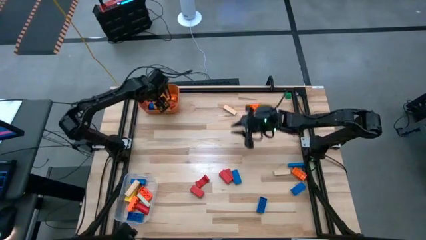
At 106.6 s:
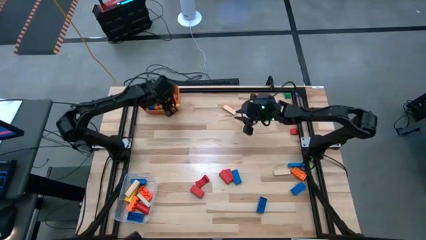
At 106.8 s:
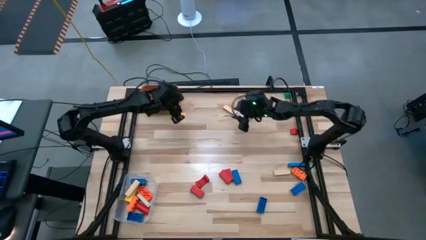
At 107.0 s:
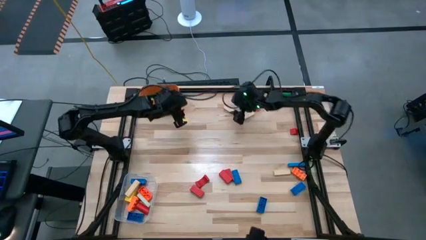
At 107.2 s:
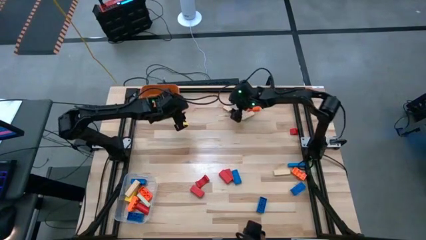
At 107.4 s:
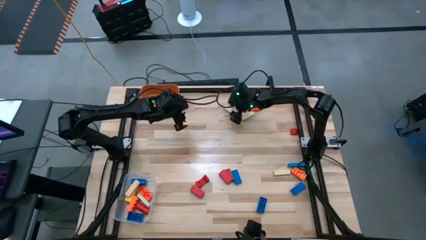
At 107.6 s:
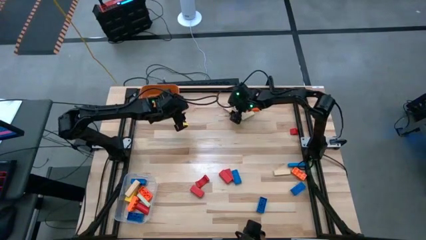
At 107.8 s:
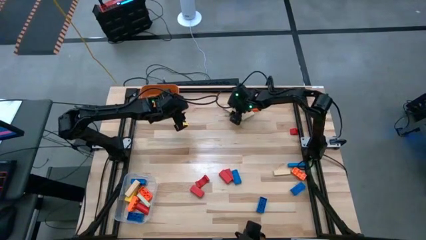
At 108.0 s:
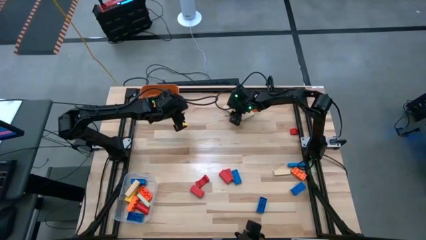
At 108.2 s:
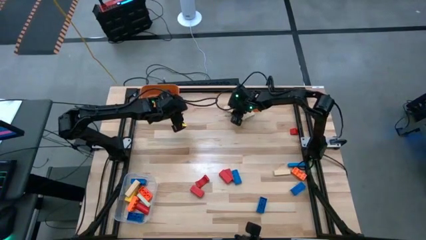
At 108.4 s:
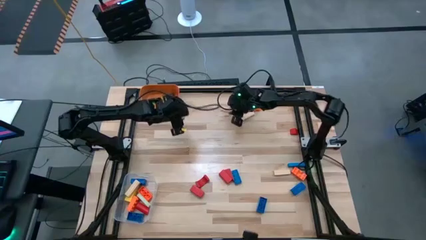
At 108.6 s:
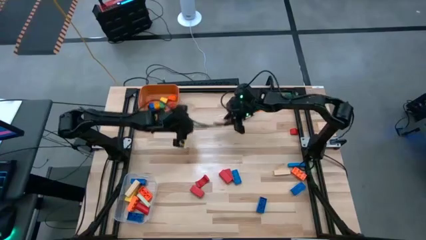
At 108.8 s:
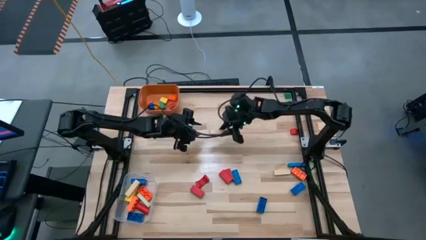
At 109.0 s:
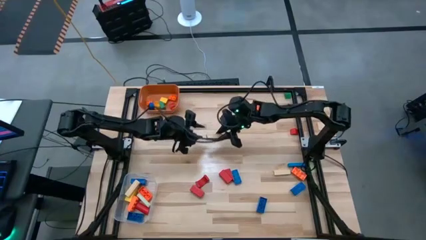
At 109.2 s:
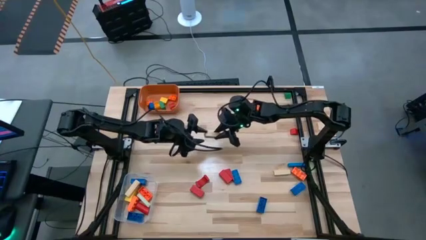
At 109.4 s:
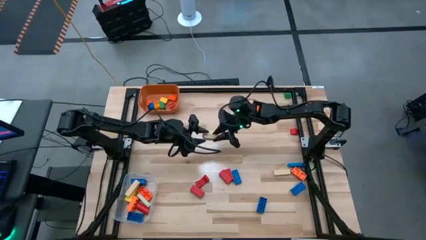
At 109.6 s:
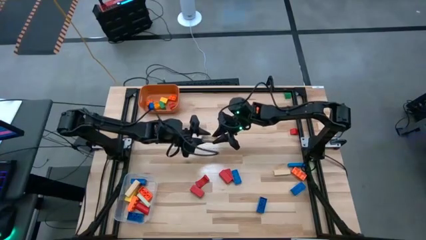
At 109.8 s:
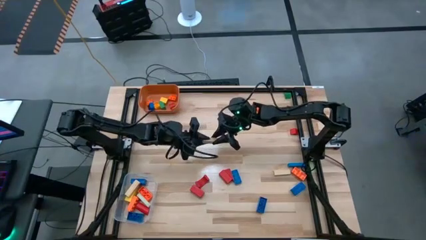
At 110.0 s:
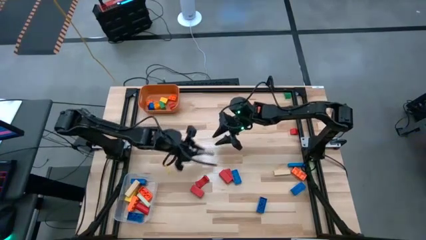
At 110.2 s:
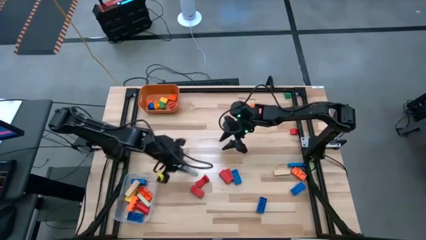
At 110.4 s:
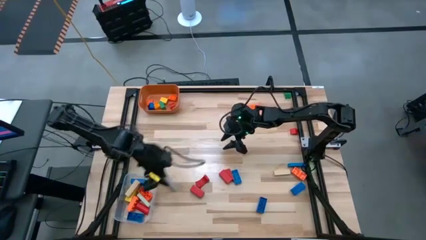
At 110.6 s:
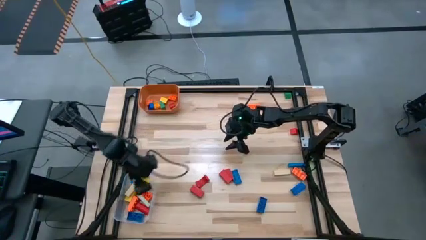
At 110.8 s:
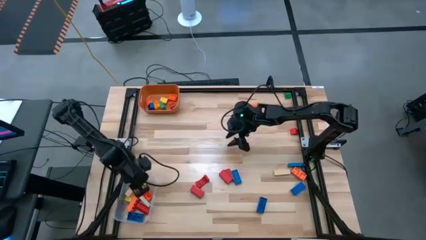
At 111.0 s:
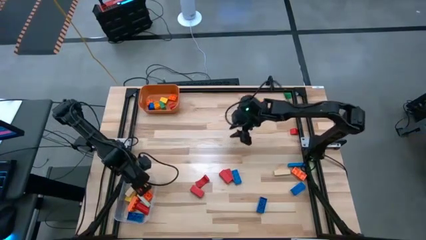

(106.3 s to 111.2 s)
Task: Sort blocks by size
Put the large brown block into the transparent bin

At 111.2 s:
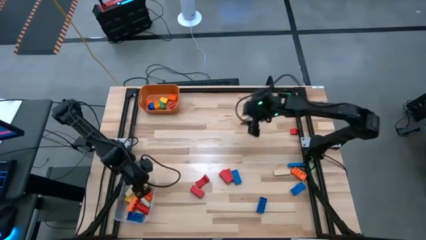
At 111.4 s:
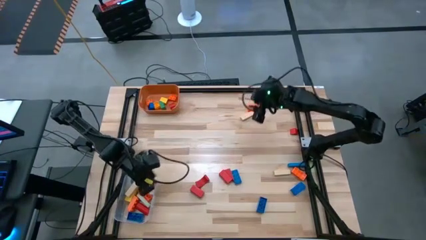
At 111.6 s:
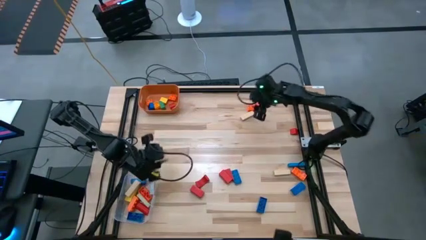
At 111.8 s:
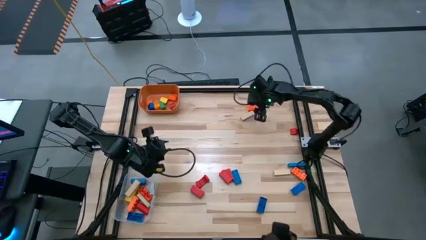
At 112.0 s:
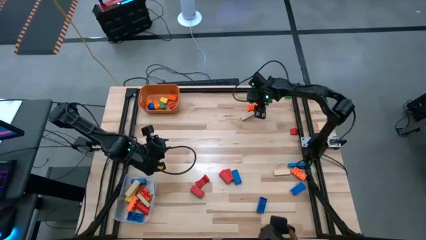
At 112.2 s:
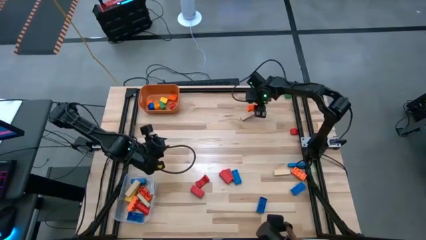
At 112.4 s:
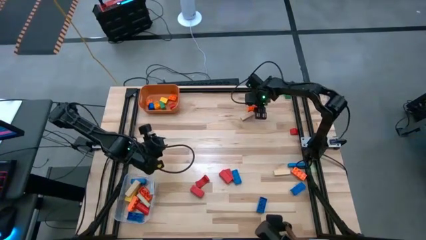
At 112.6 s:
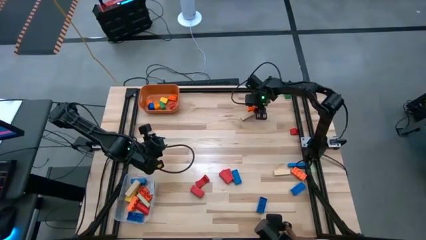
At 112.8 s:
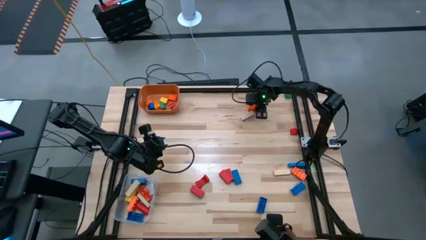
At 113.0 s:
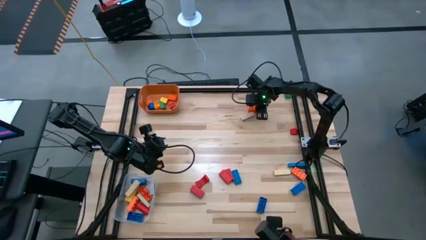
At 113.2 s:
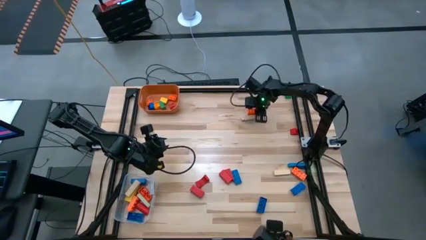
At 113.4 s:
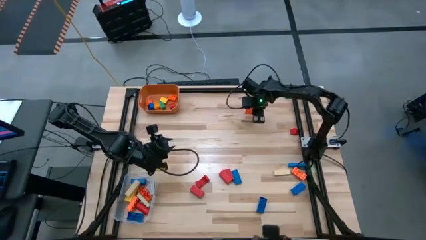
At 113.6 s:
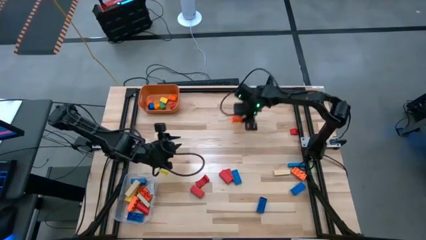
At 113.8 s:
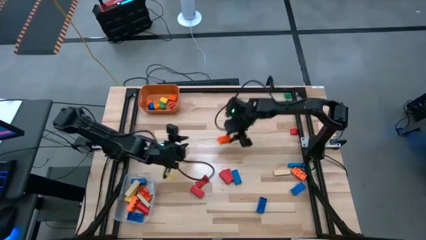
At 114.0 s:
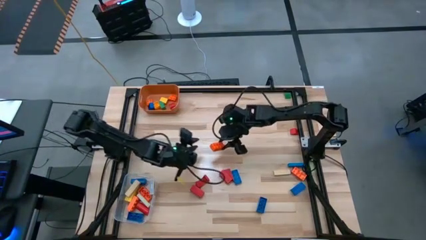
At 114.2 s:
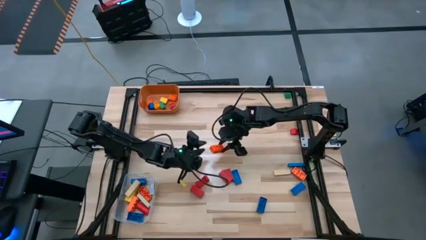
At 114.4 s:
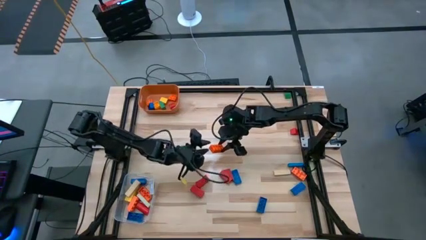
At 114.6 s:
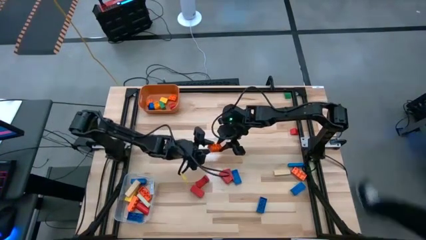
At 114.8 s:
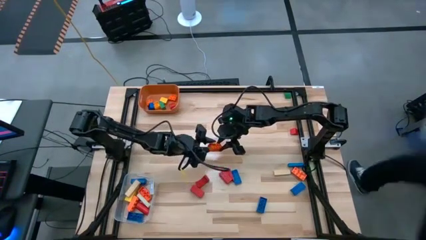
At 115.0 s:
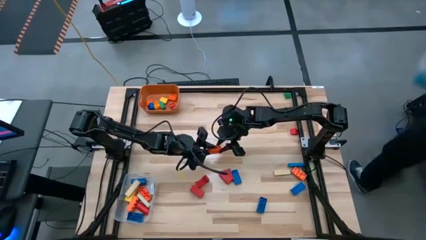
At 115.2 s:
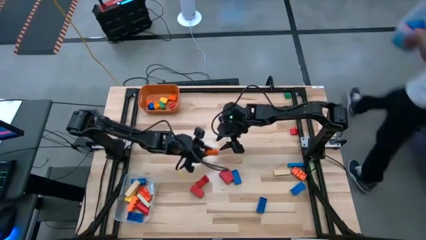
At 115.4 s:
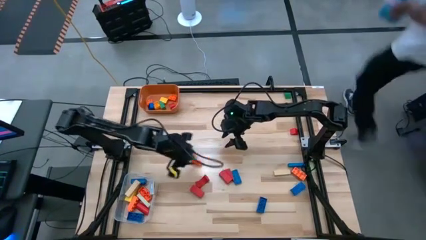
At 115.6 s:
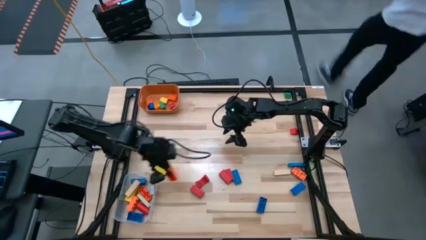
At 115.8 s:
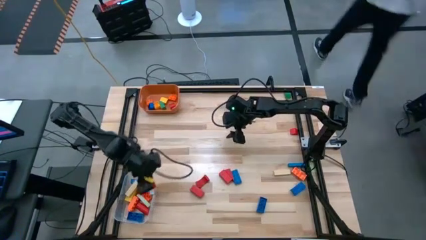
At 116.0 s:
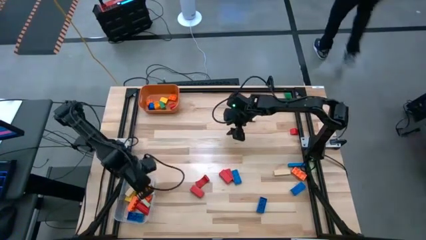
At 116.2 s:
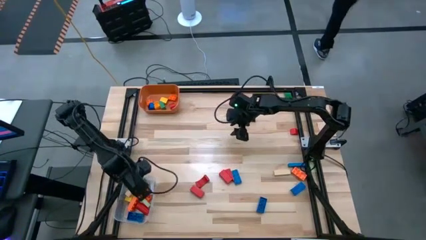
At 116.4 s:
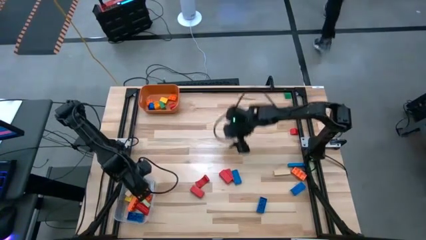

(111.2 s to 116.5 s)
Put the large orange game piece into the transparent bin

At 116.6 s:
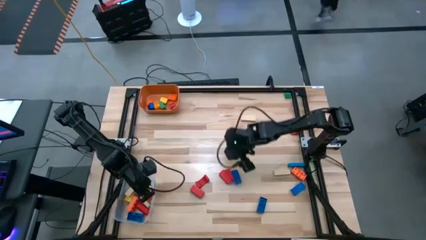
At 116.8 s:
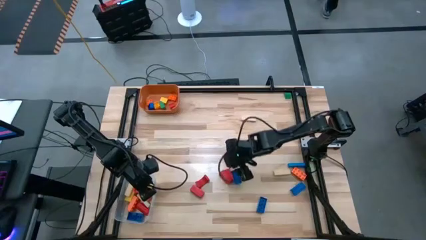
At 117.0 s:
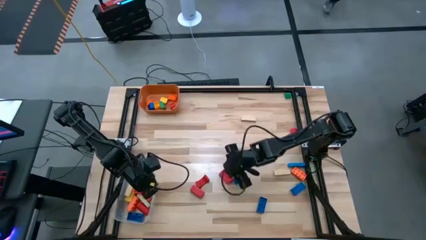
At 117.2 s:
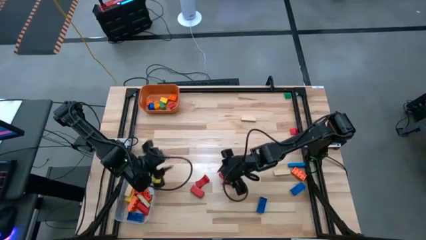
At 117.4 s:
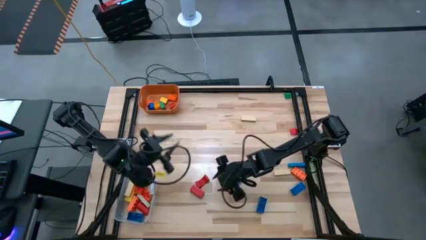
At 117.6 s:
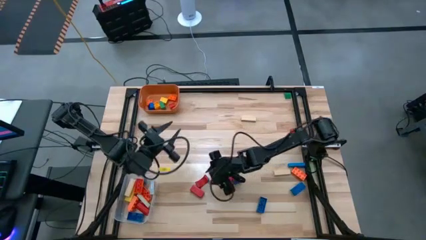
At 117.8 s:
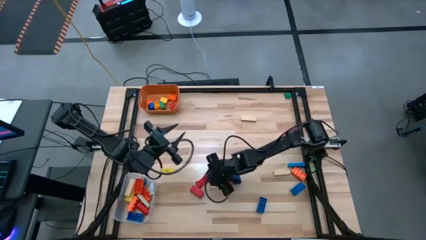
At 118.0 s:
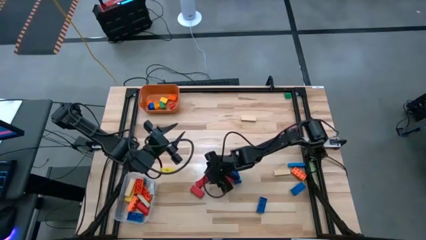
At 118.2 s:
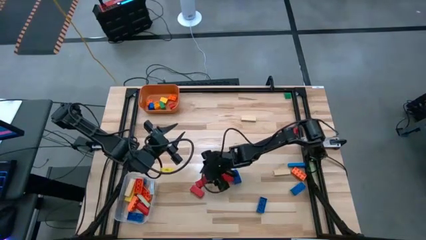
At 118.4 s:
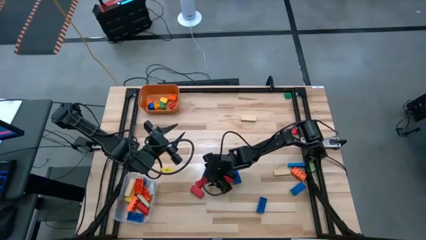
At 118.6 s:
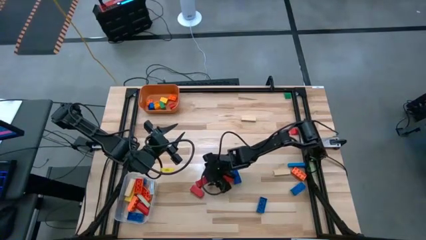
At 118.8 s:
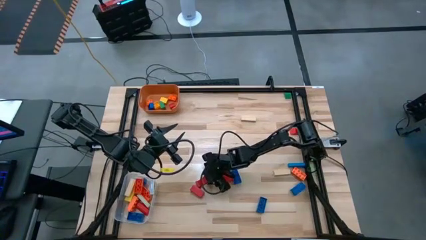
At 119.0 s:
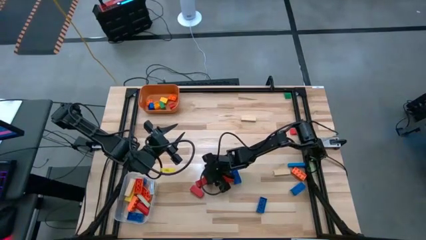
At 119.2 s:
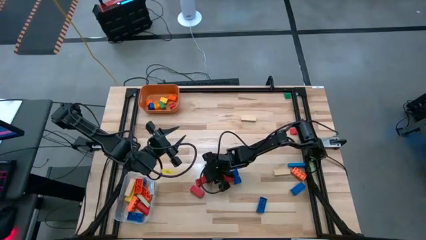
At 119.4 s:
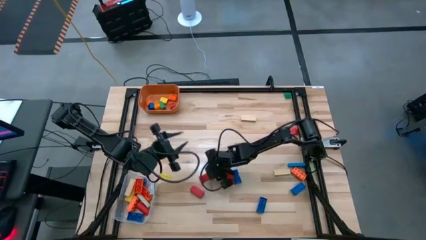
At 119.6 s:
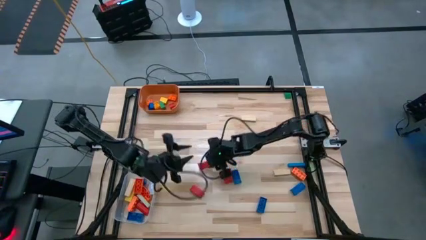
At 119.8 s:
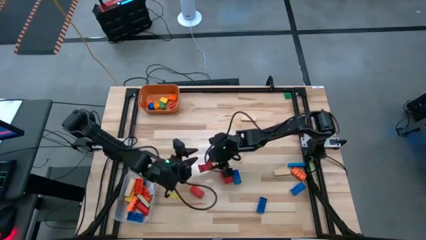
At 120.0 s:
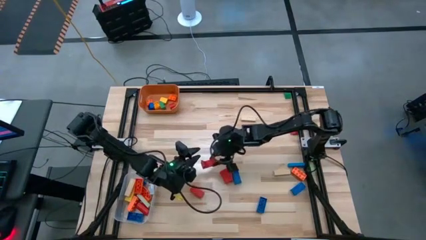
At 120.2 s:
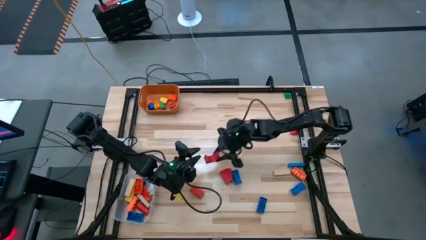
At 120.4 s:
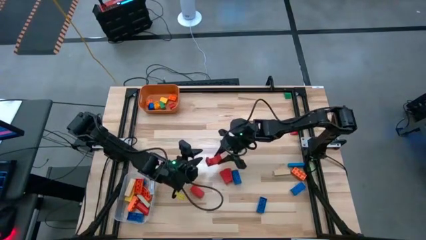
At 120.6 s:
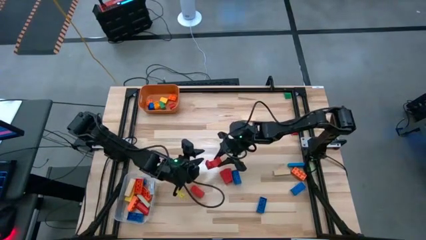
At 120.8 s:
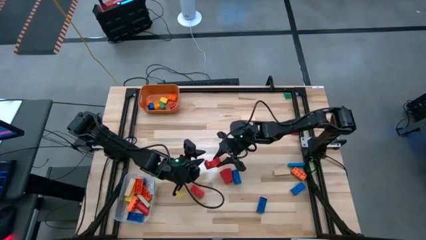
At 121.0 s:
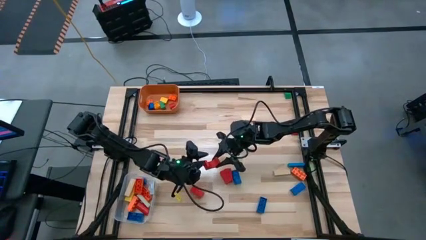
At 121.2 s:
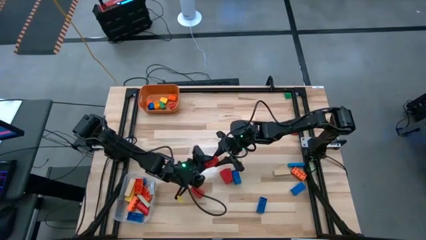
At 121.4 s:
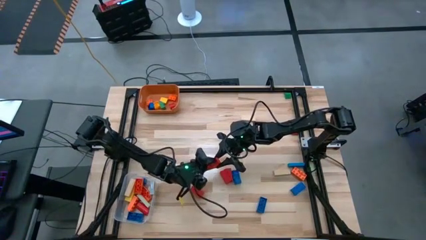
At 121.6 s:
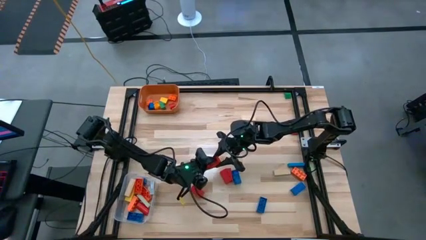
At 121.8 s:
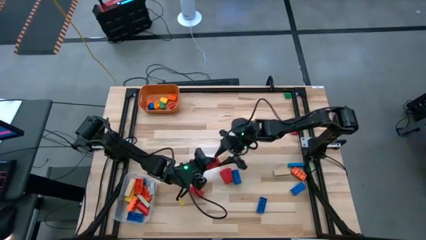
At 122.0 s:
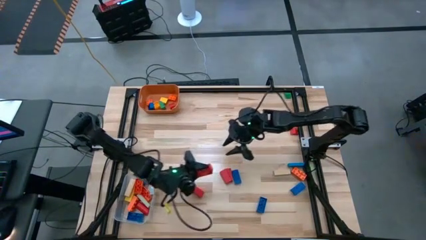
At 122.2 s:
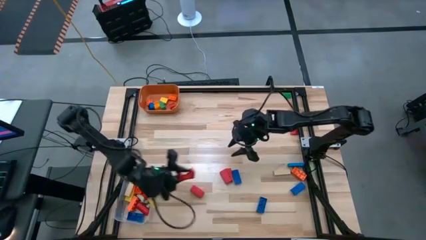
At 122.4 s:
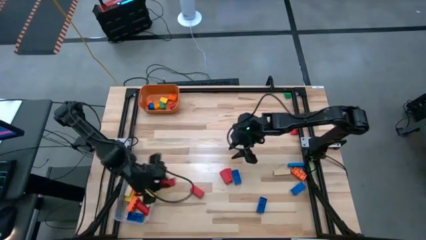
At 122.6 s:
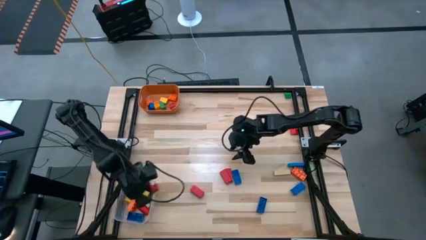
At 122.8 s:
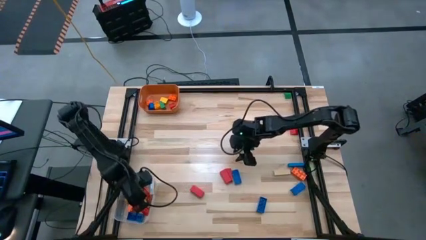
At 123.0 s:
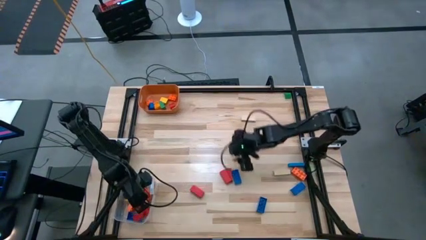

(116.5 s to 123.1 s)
Put the large red block into the transparent bin
